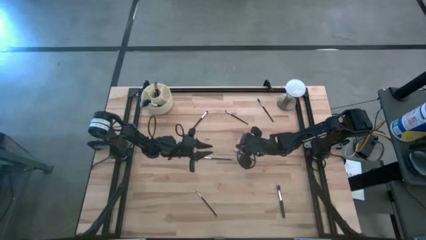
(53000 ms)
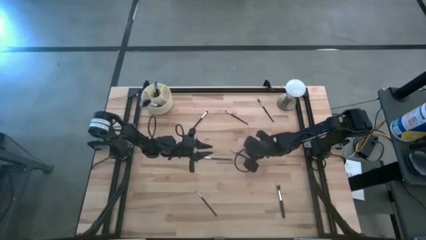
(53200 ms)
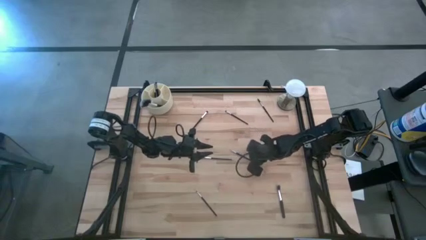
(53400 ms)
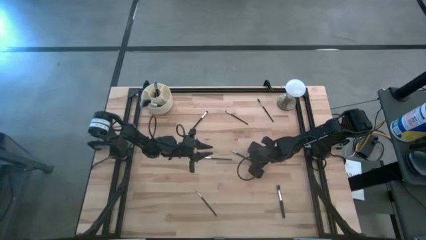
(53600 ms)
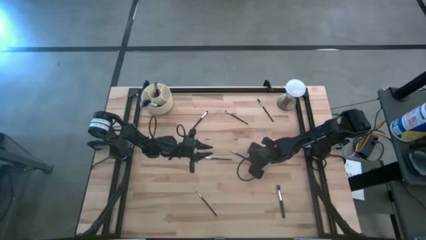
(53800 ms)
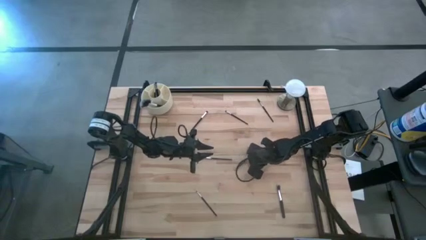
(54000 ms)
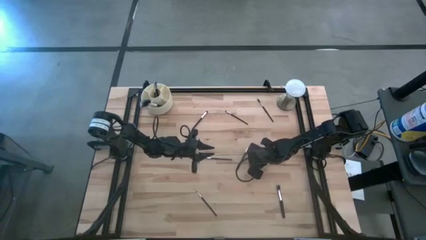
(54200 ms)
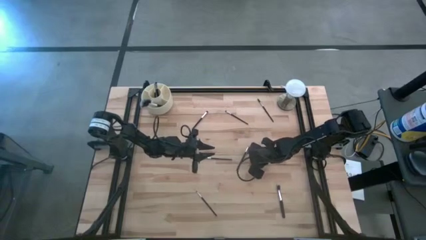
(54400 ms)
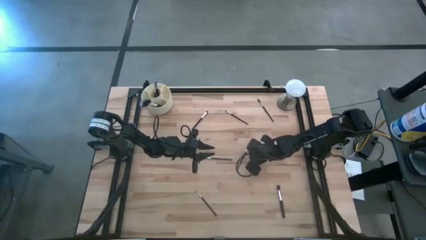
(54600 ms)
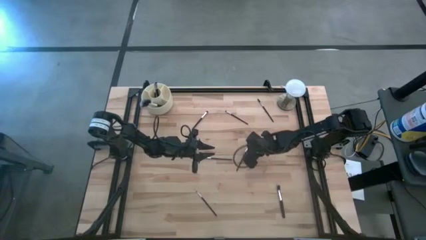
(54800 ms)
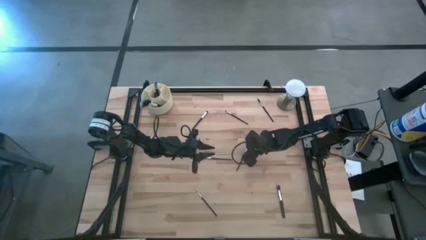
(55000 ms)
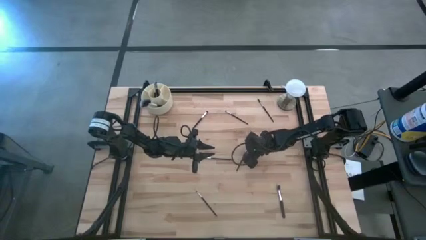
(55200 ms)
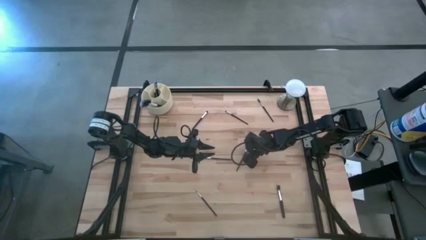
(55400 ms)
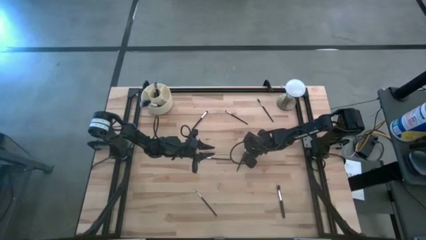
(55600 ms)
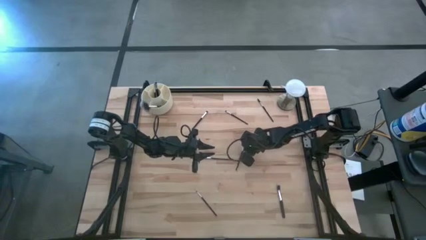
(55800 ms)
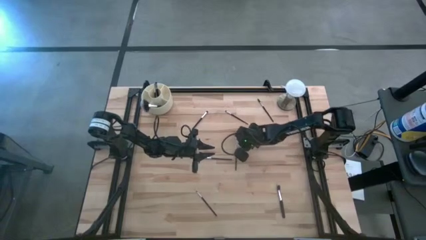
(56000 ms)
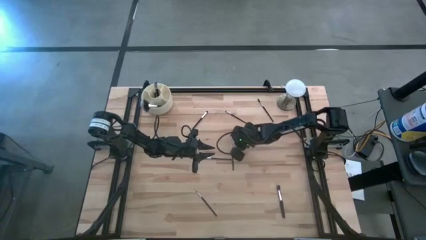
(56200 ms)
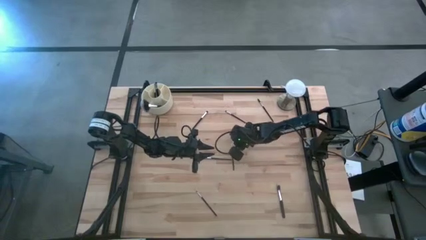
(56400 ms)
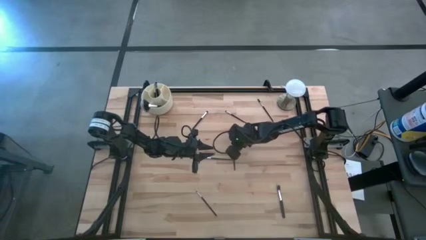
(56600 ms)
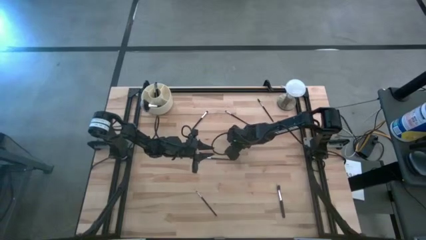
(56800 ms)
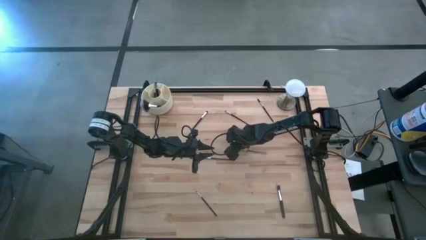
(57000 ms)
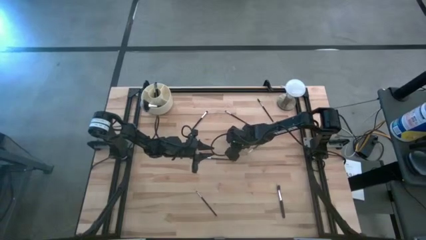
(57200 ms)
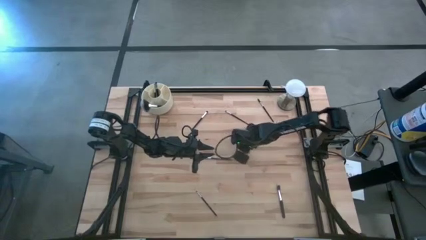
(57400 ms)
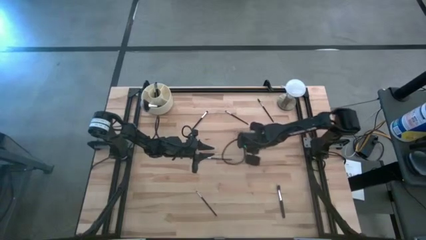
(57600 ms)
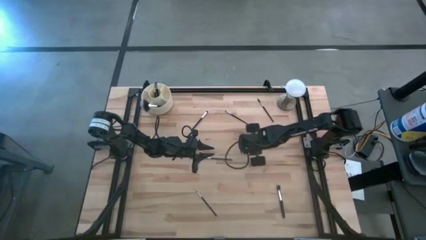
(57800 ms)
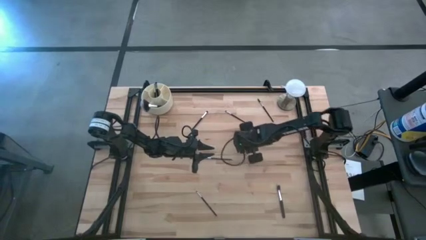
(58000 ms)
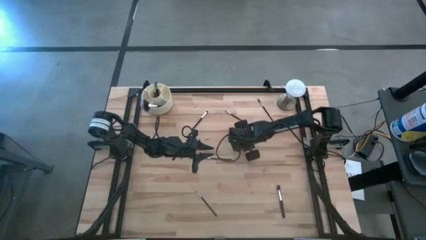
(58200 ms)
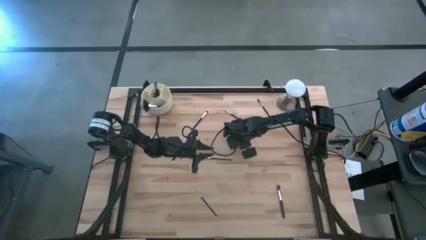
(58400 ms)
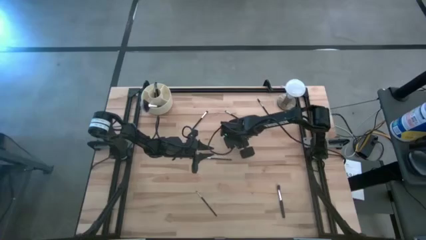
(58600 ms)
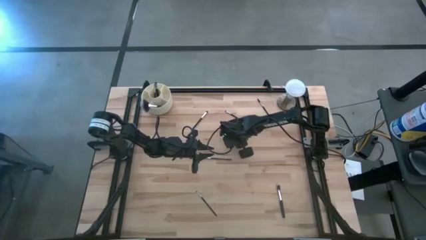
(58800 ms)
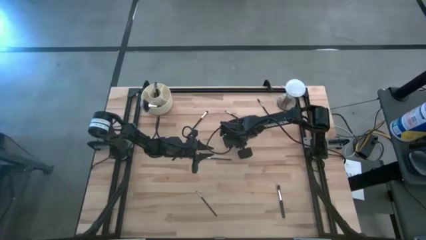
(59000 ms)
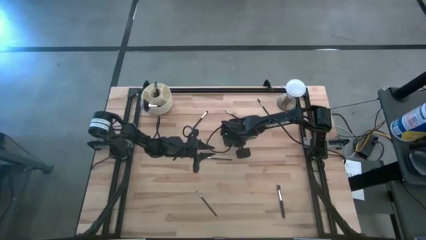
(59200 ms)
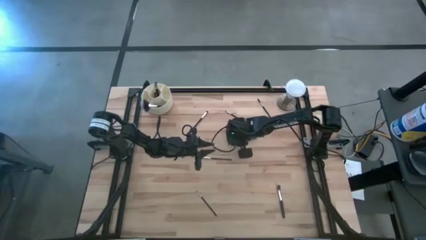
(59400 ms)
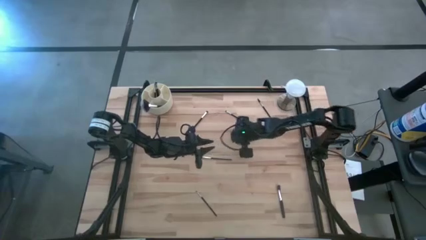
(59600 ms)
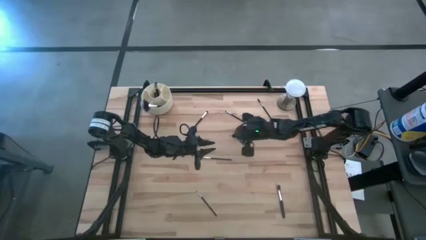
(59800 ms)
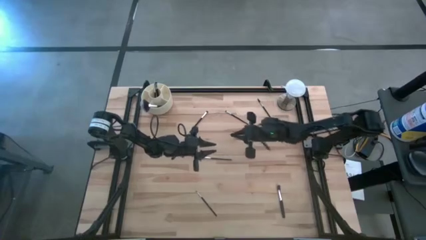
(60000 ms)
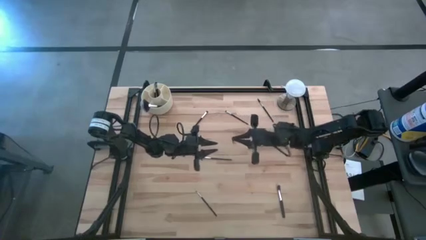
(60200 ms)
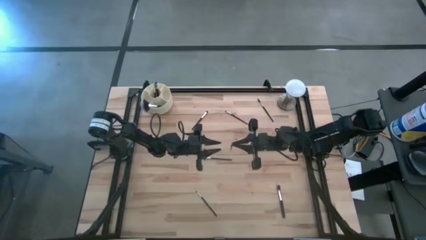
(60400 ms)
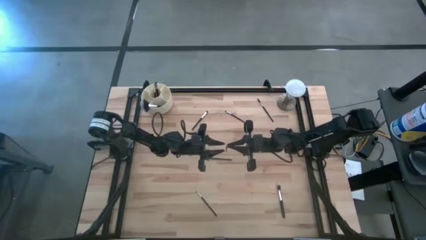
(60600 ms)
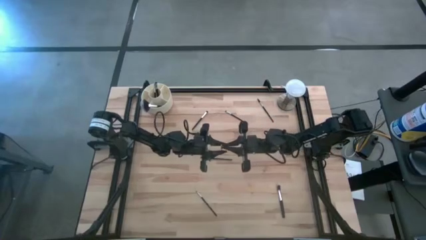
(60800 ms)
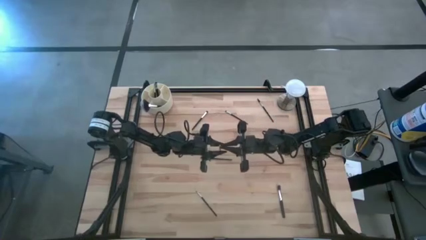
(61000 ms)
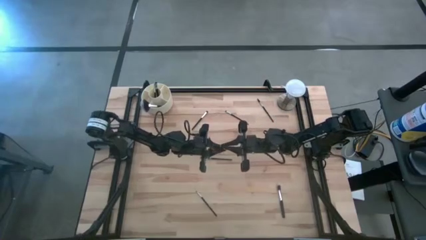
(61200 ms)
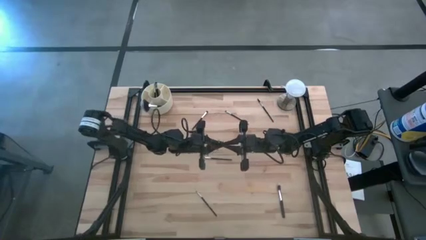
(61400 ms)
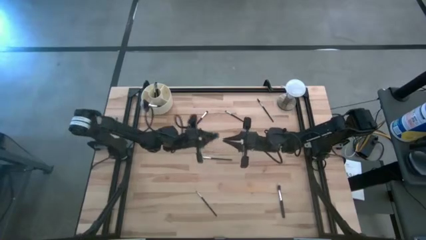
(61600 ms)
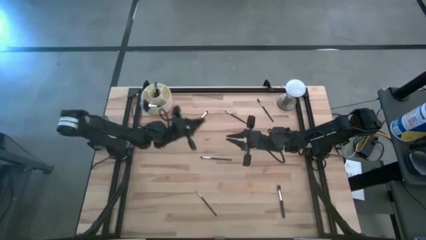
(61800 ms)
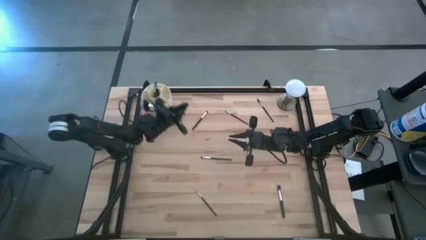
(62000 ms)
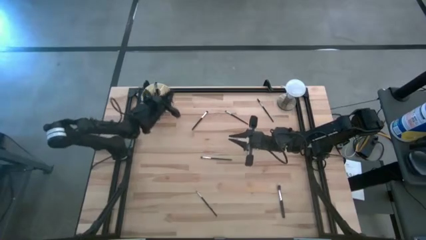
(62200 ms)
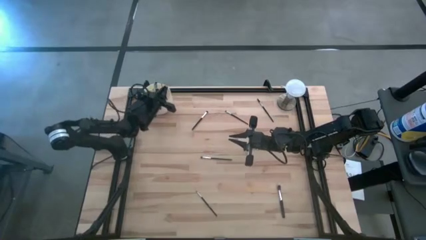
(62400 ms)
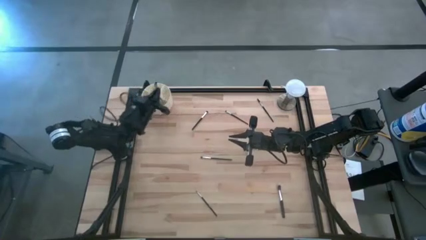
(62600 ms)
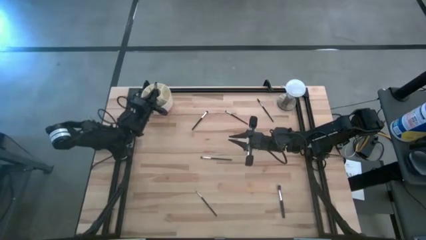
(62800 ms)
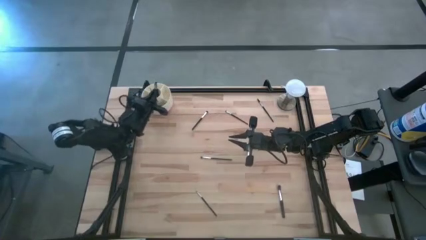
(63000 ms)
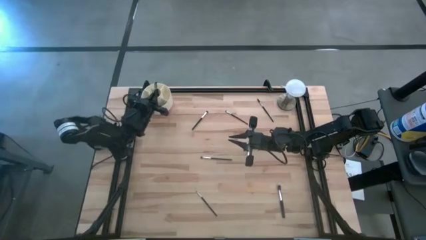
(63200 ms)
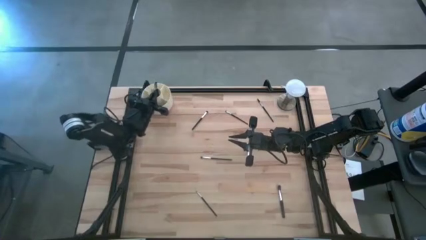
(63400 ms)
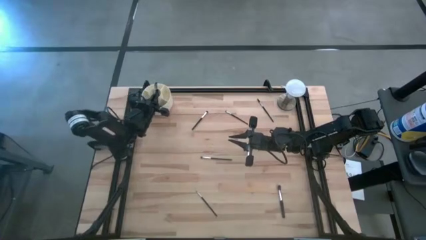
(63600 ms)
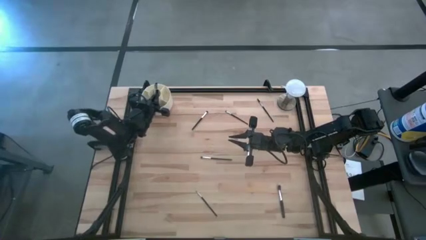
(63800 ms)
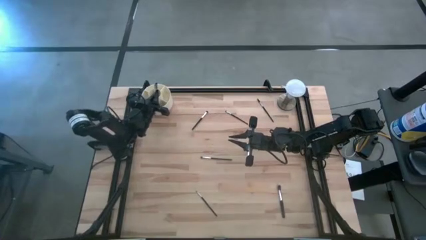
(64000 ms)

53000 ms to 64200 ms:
Task: Put items in baskets/containers
Put the liner brush into the organizer

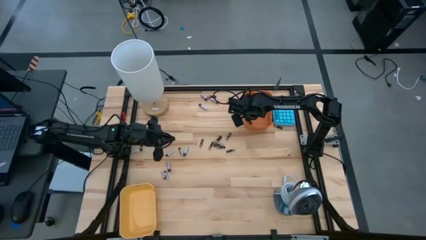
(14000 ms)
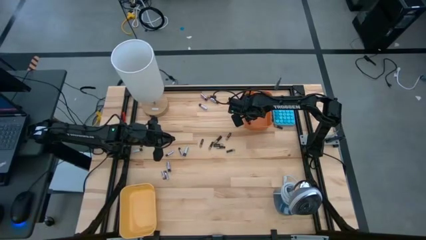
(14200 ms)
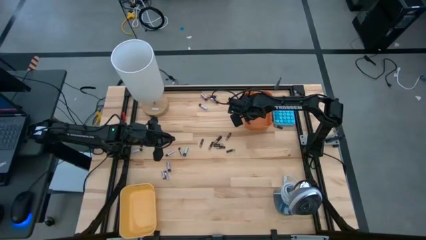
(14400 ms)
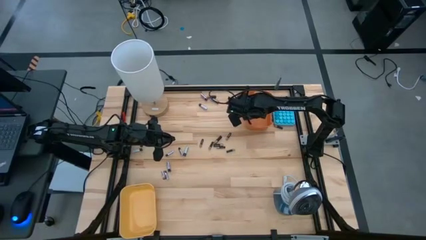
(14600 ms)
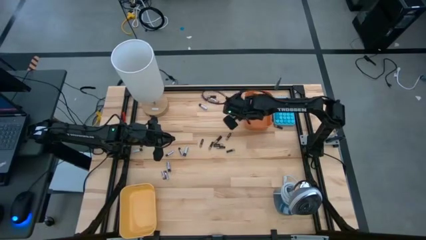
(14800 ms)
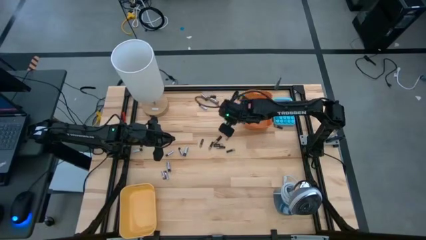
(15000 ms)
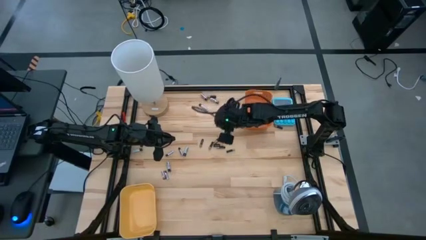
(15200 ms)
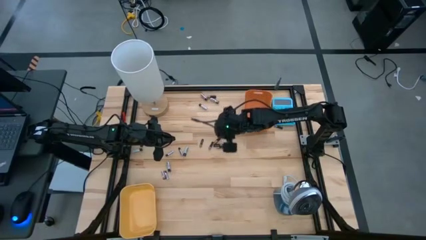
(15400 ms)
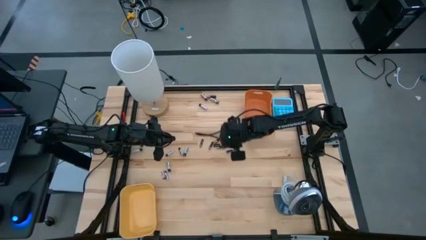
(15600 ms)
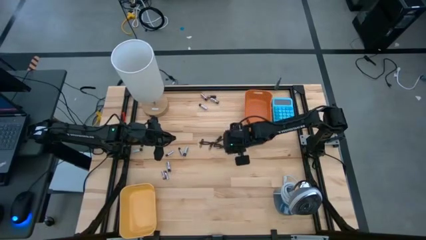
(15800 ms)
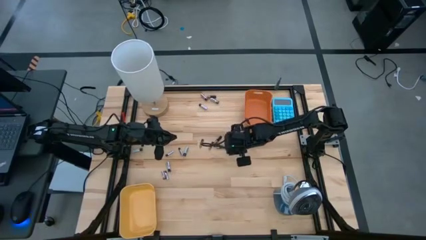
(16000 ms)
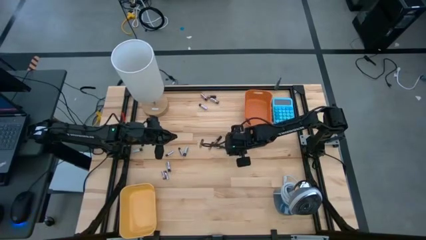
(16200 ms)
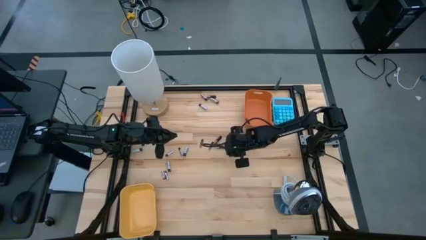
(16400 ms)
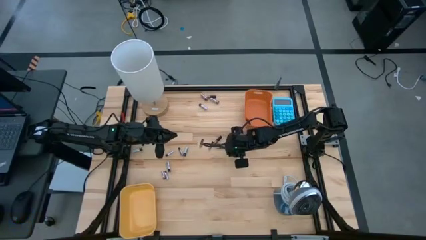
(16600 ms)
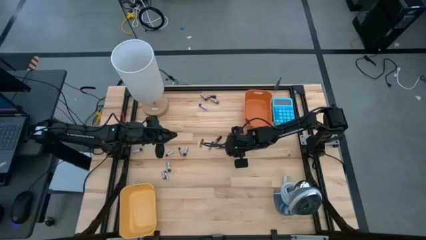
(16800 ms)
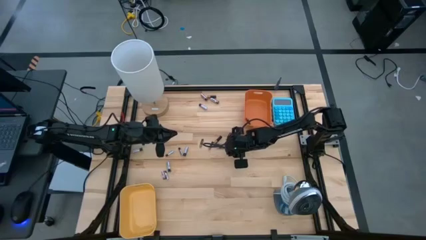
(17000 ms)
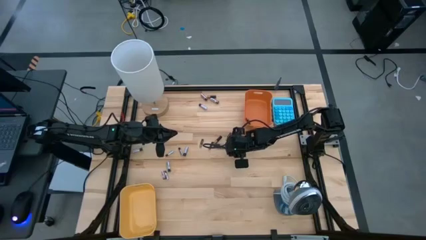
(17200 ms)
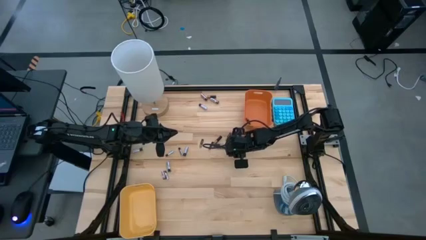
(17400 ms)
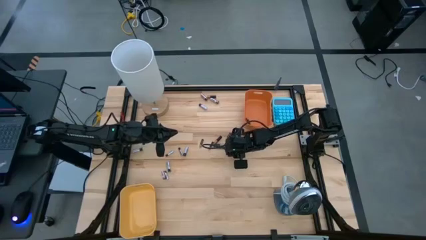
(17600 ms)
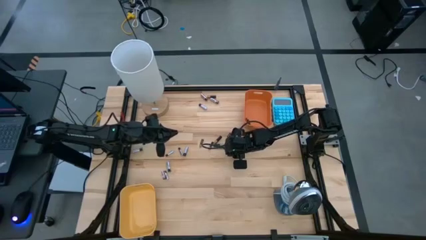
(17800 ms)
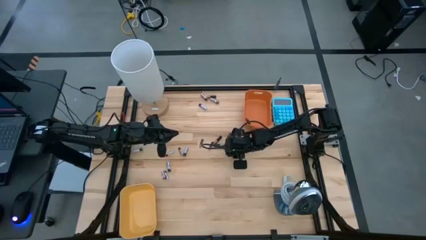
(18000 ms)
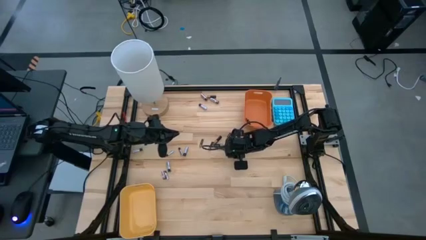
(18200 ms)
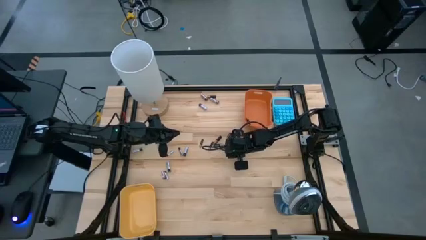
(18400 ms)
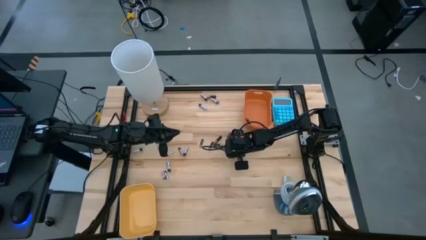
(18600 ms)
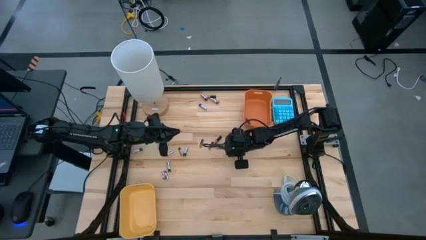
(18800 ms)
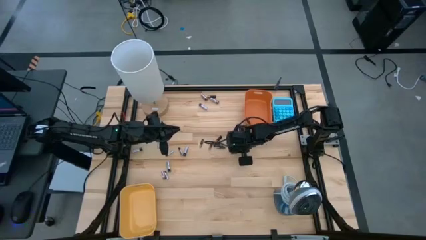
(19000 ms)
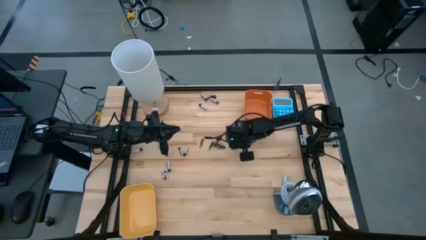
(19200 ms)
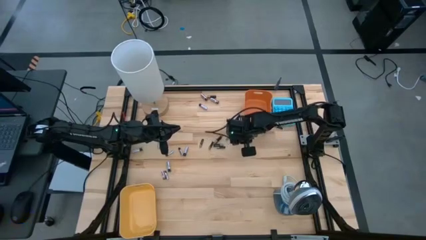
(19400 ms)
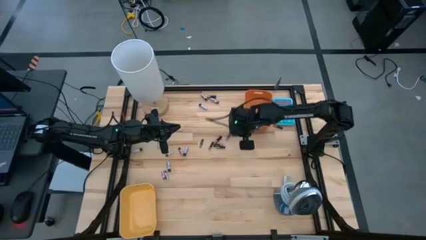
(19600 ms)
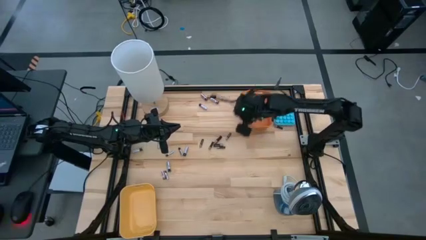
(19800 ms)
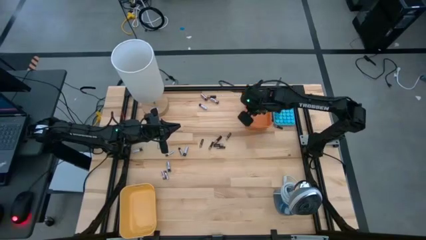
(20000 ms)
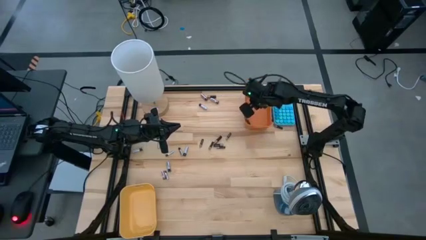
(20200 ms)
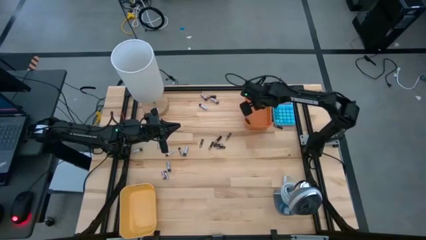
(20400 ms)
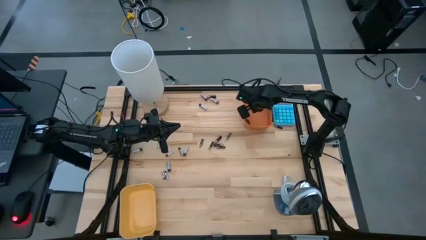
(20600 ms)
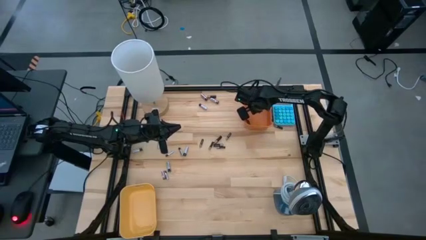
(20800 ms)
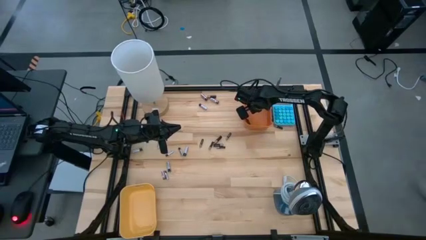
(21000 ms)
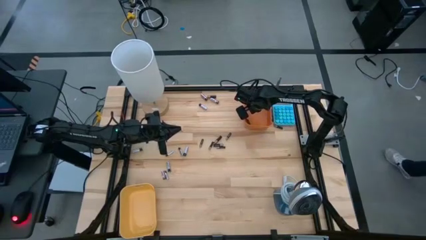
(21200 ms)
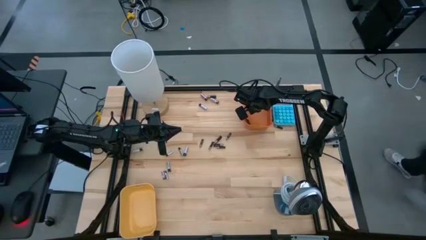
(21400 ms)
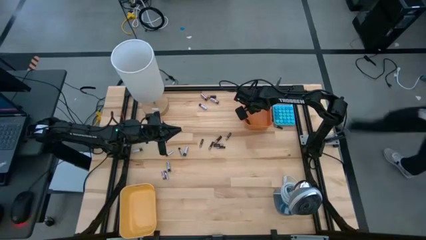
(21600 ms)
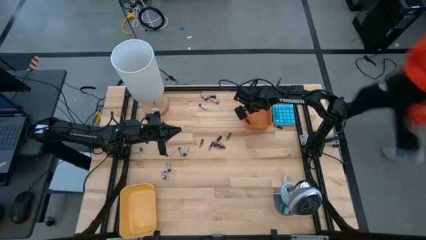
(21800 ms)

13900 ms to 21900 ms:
Task: Sort batteries
Put the black battery into the orange bin
